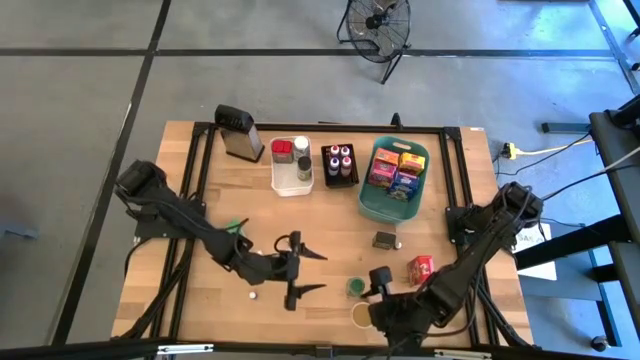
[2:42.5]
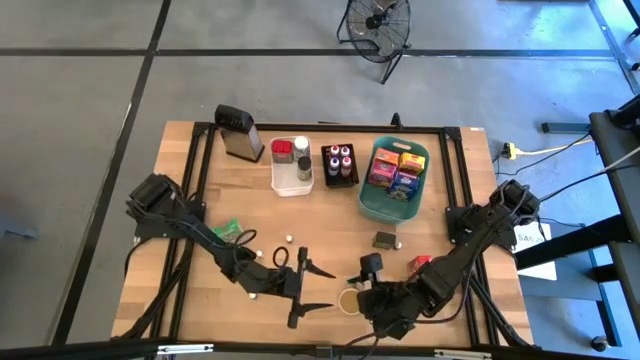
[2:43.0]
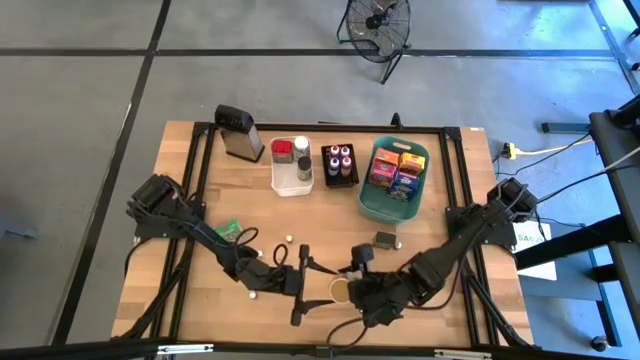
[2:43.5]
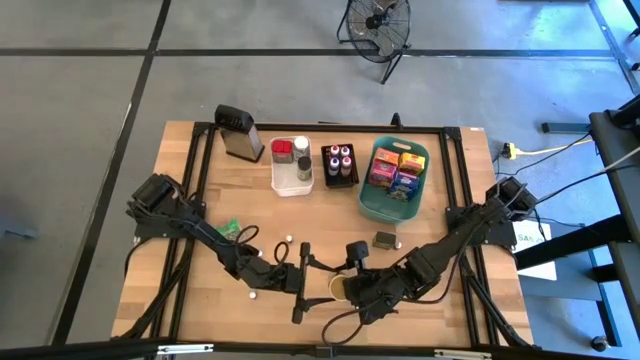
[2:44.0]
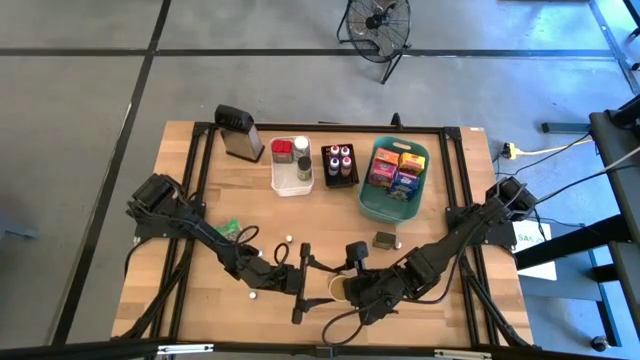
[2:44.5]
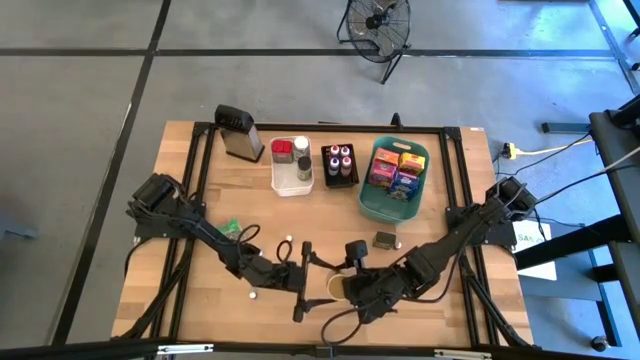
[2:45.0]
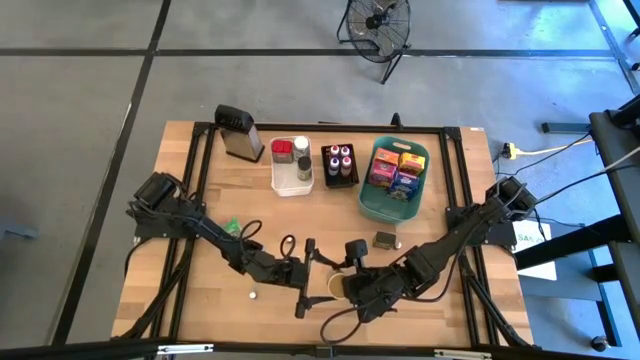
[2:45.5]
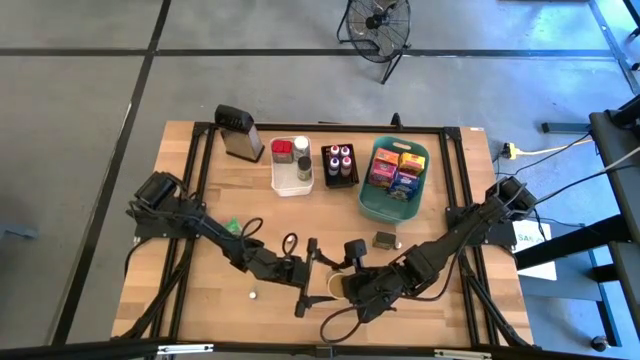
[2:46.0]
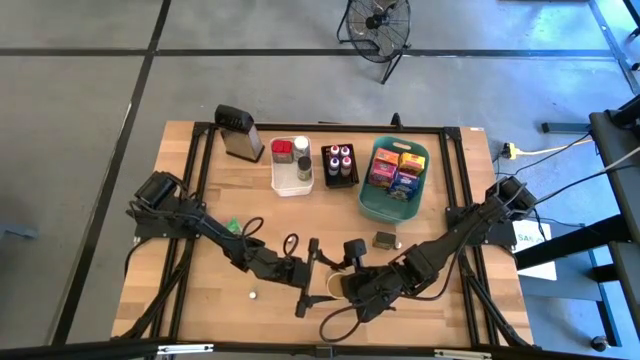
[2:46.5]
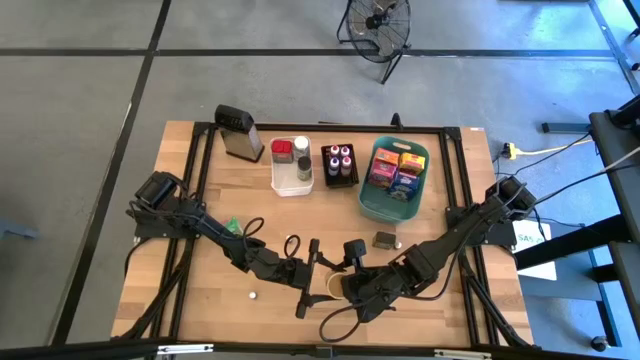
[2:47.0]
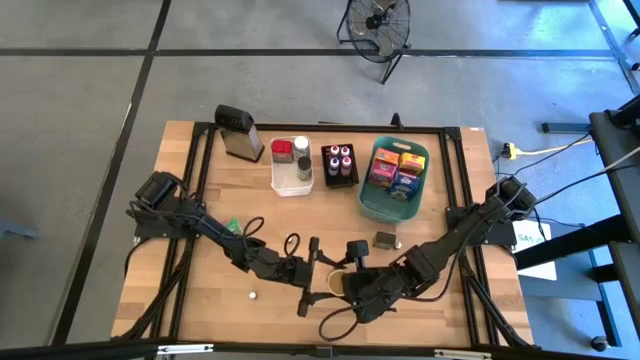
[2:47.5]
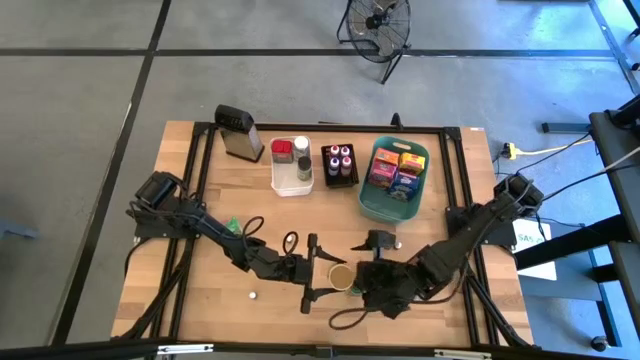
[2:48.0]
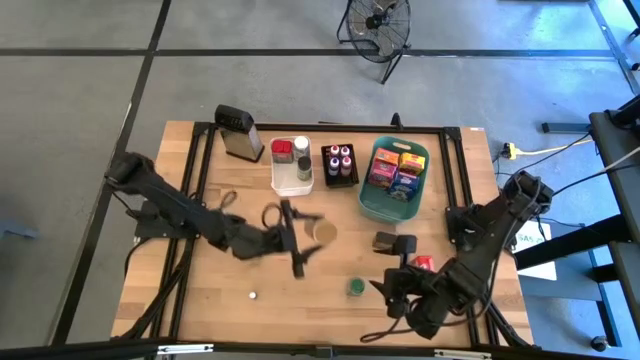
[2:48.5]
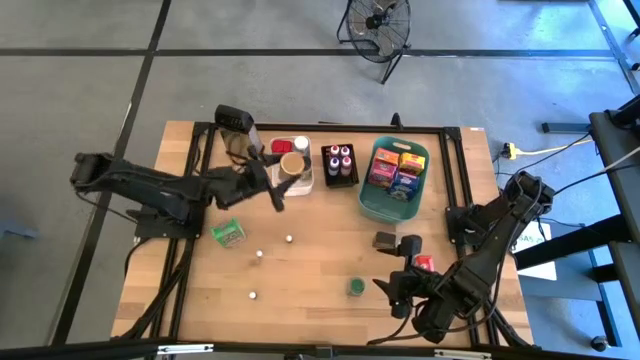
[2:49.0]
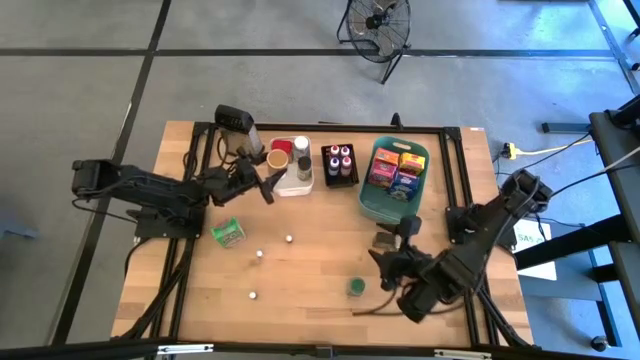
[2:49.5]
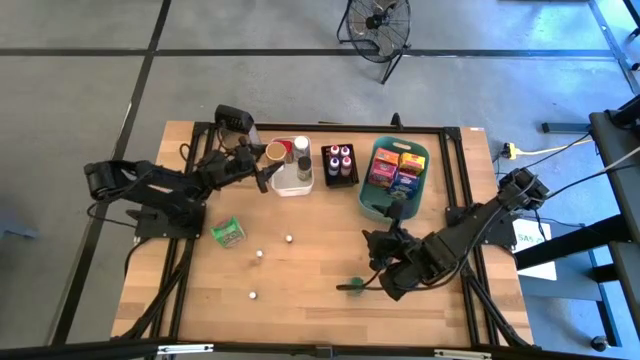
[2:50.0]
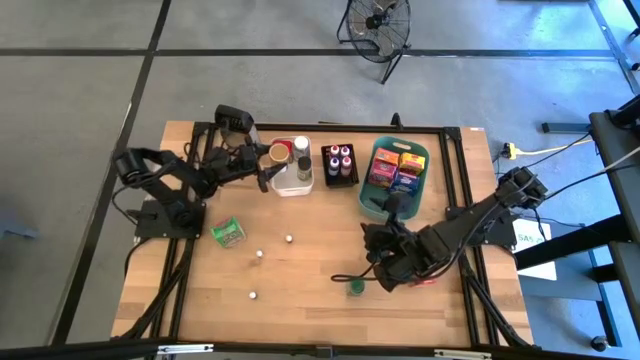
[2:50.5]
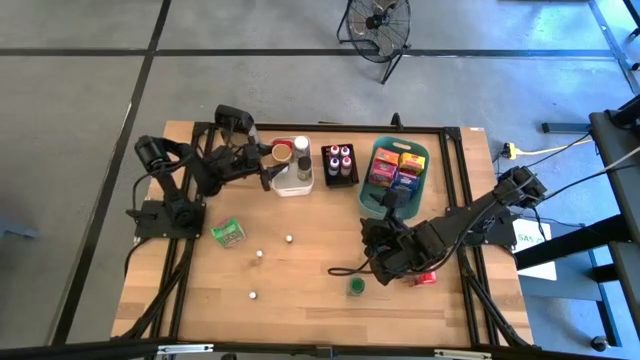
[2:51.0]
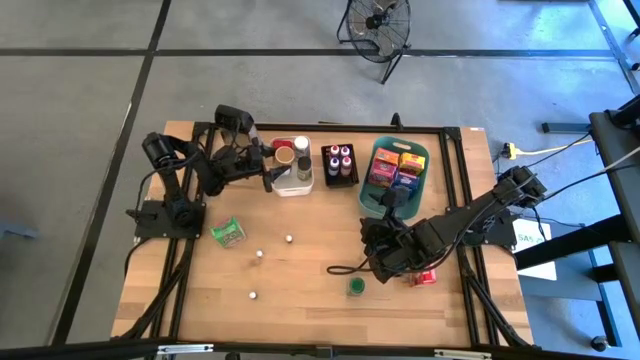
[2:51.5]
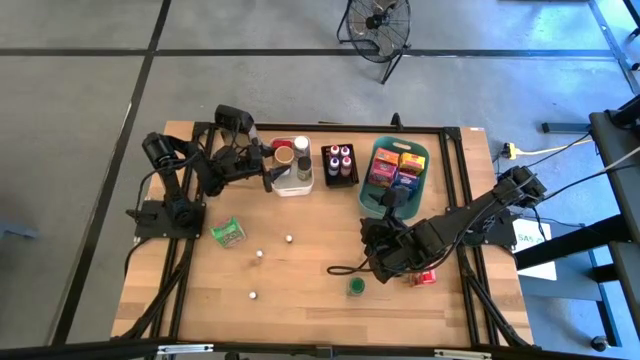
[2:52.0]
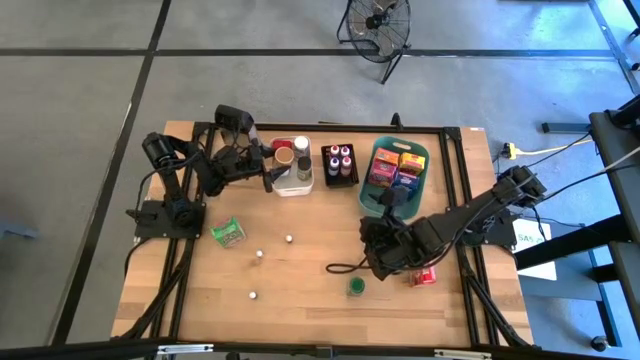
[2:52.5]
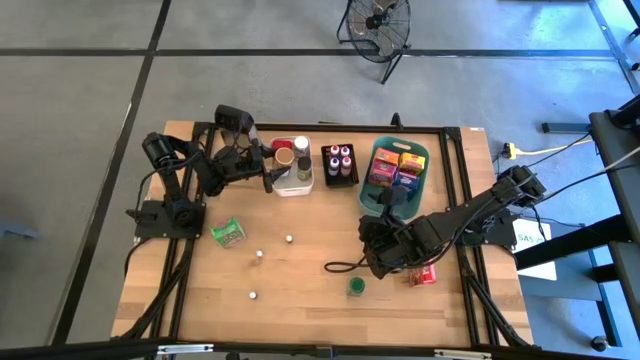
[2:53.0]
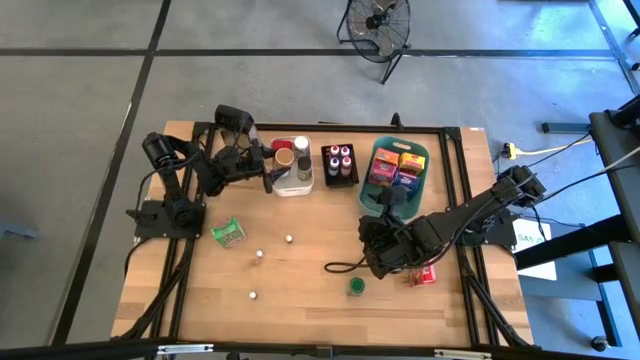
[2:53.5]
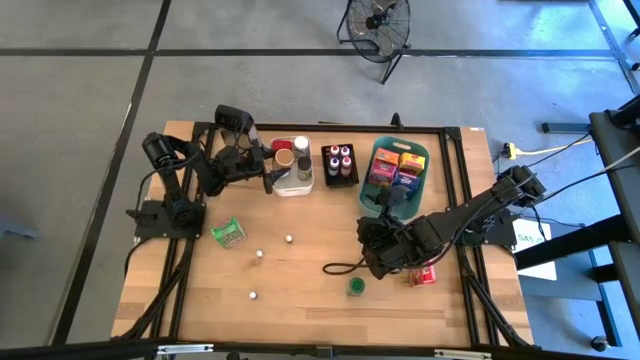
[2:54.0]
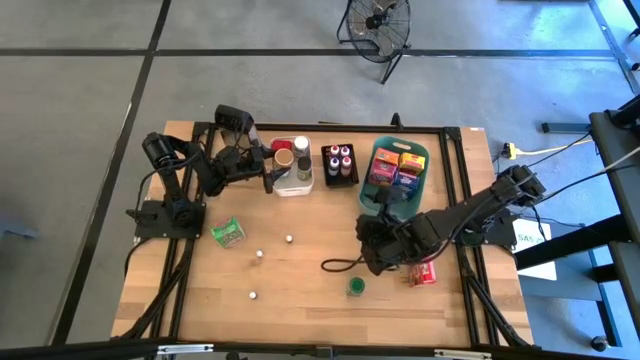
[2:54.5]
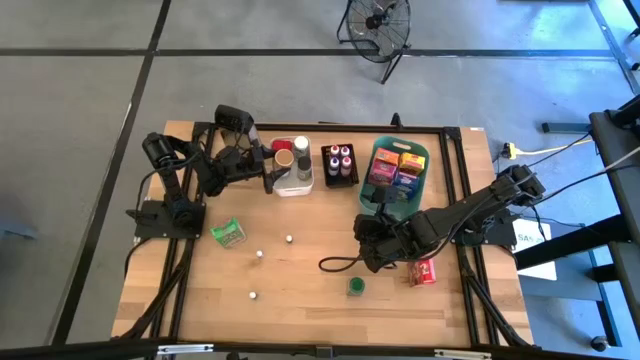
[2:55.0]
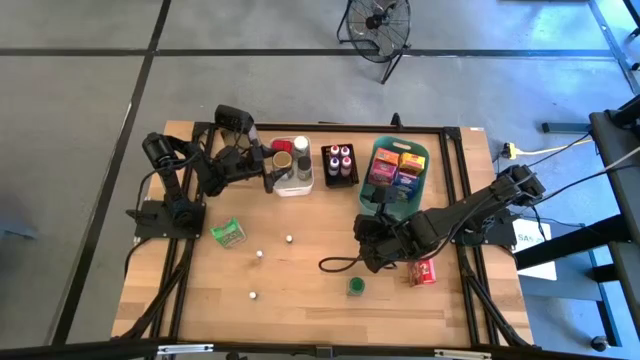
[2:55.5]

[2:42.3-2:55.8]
Task: Pick & Place Kitchen Items
Put the light brown spice bottle into the white bin

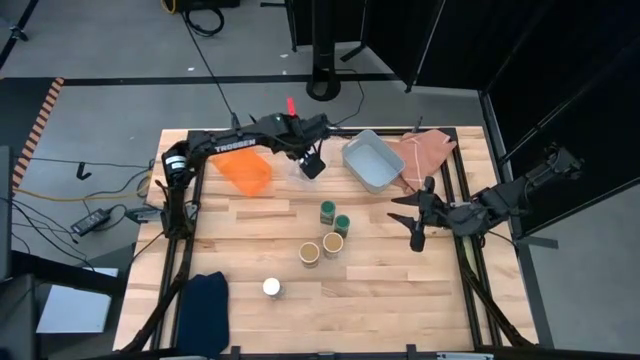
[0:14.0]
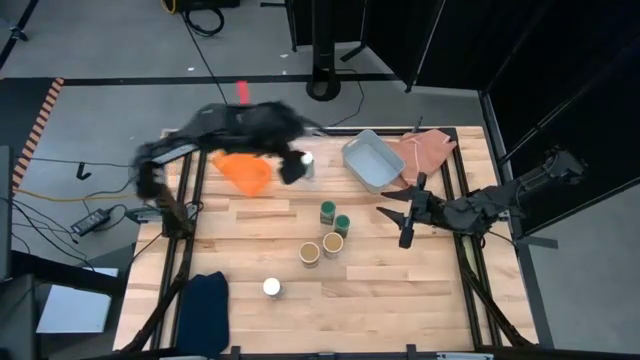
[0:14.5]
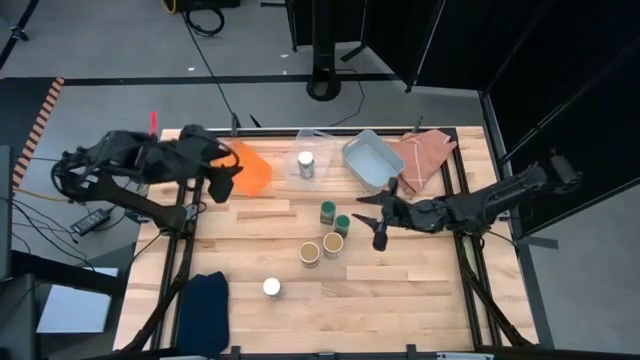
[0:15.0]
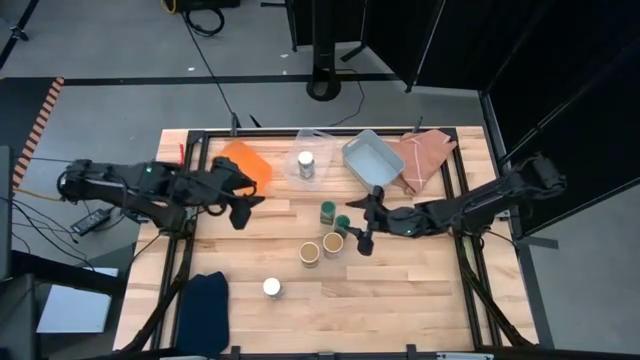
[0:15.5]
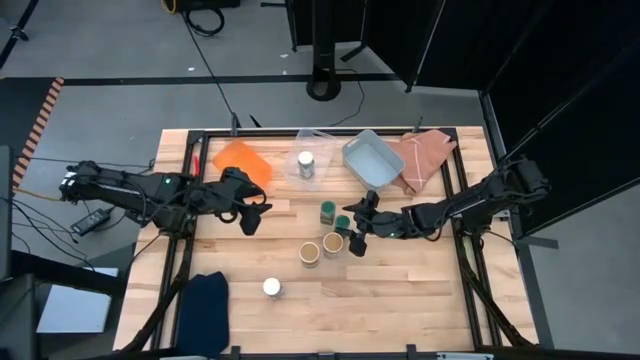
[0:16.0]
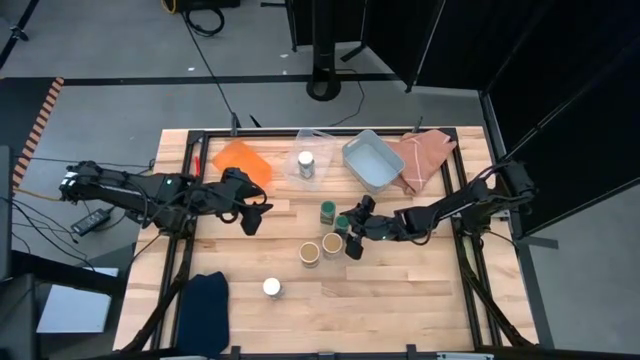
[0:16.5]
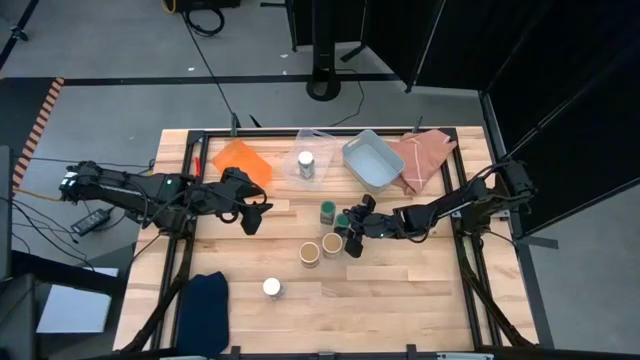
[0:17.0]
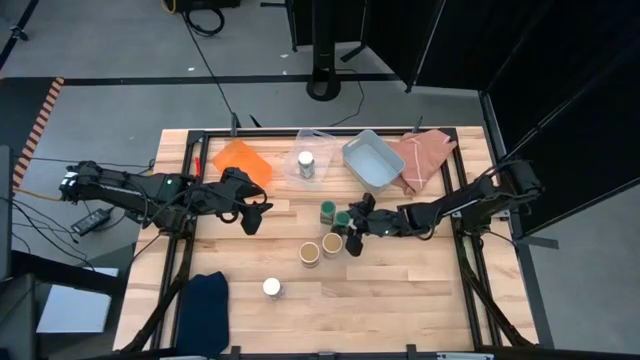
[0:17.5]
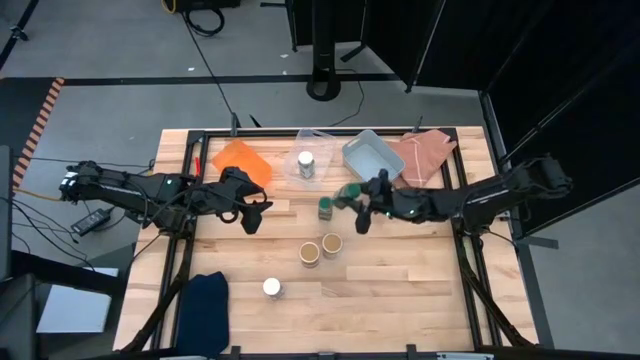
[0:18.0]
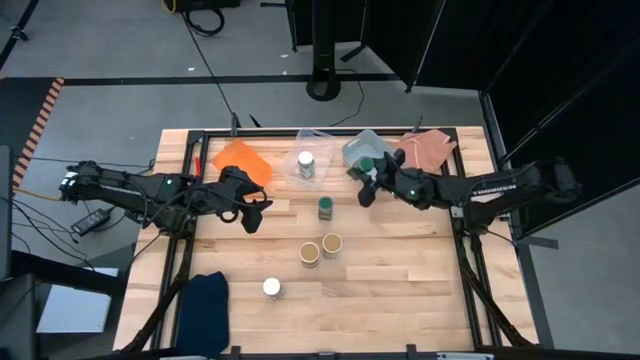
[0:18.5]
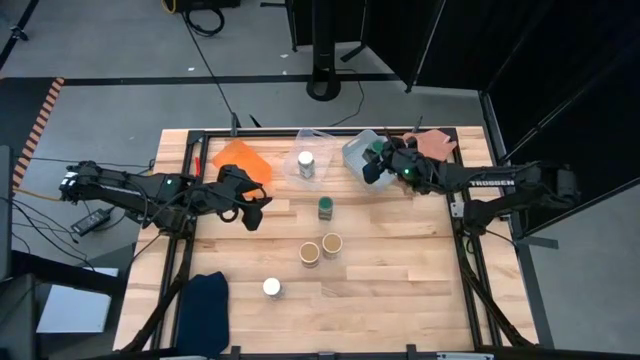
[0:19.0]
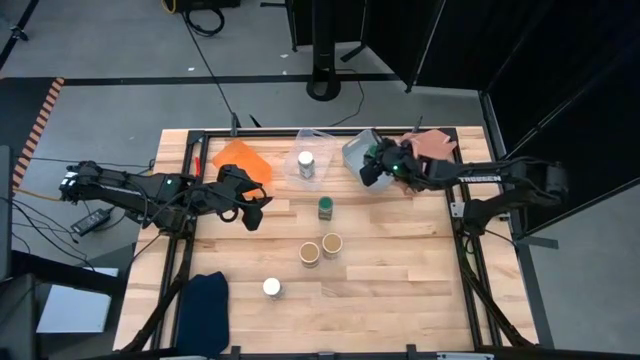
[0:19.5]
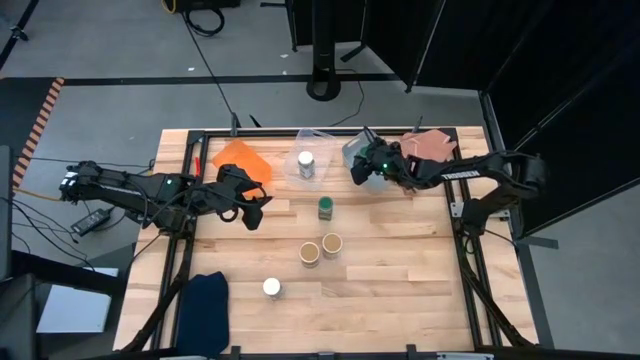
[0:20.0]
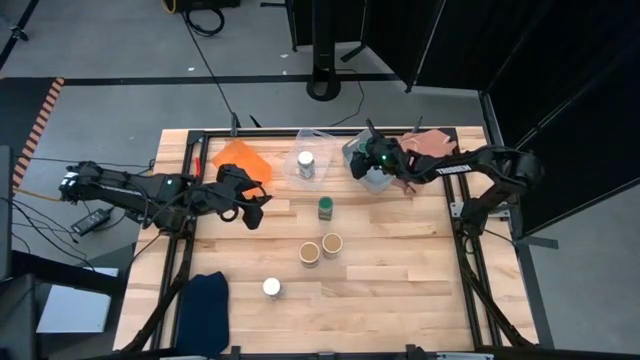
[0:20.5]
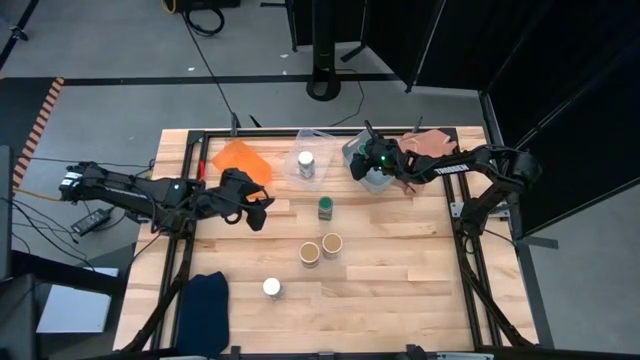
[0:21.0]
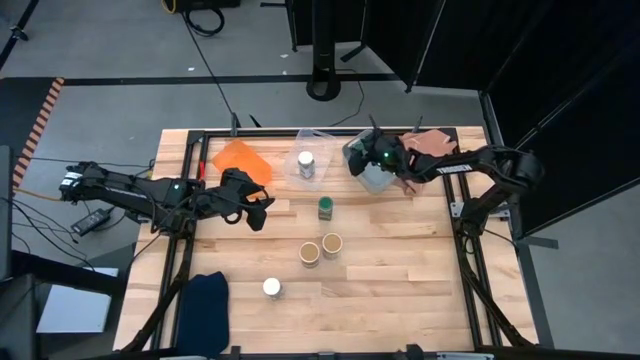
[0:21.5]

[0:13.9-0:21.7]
Task: Sort spices by type
Put the right green seasoning bottle into the gray bin
